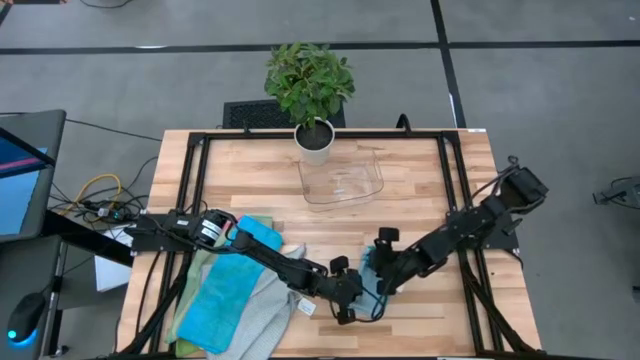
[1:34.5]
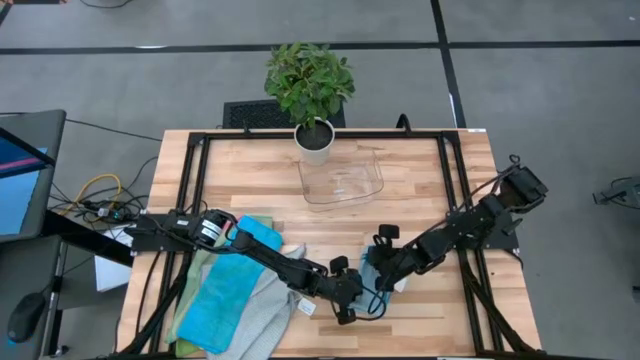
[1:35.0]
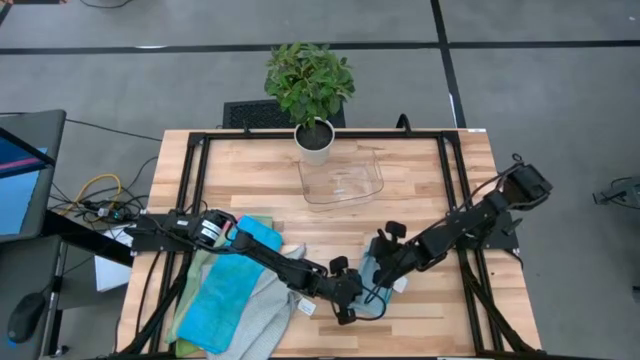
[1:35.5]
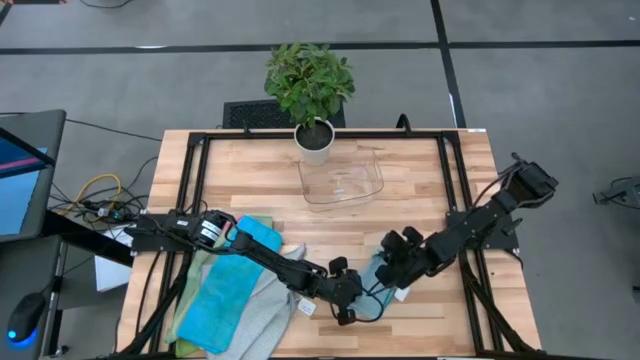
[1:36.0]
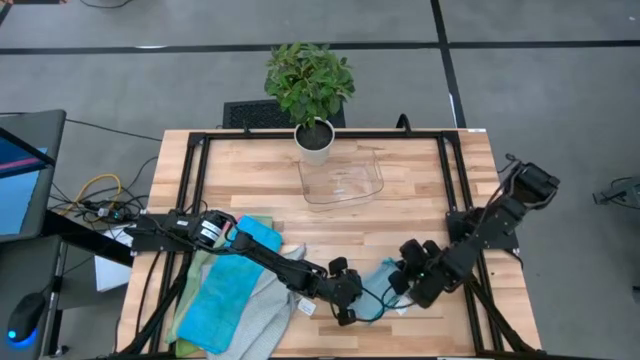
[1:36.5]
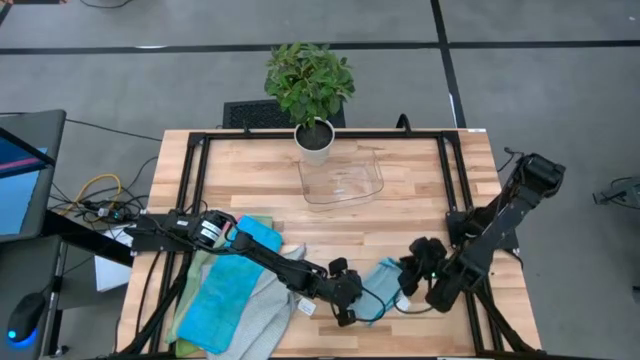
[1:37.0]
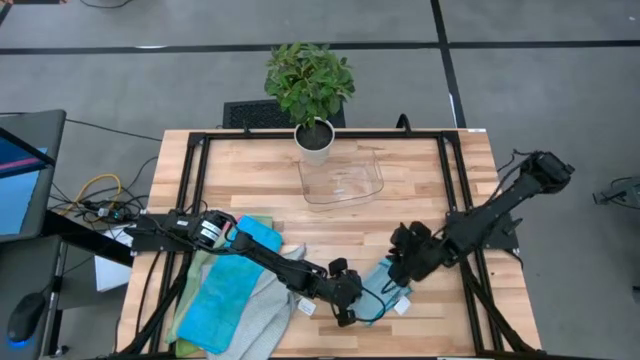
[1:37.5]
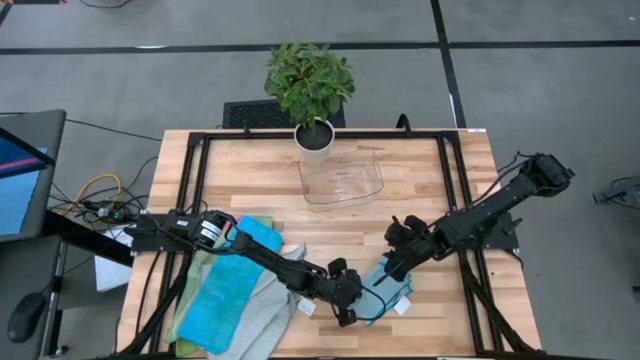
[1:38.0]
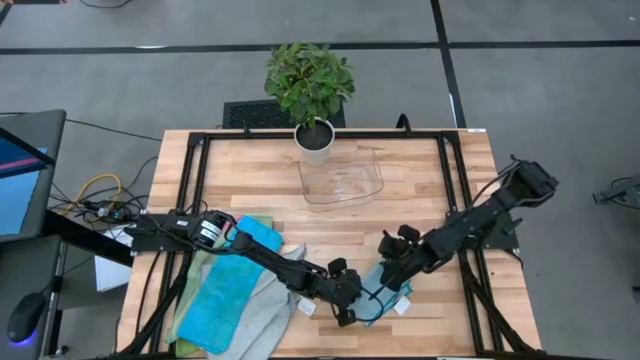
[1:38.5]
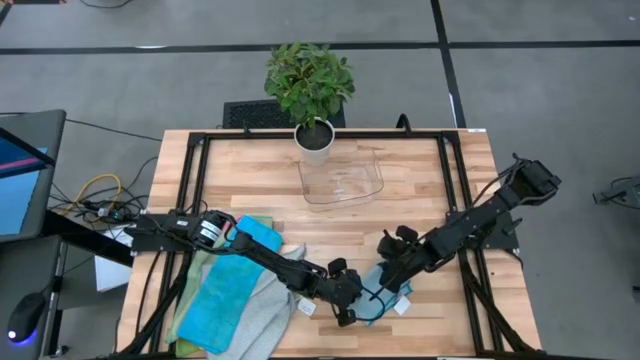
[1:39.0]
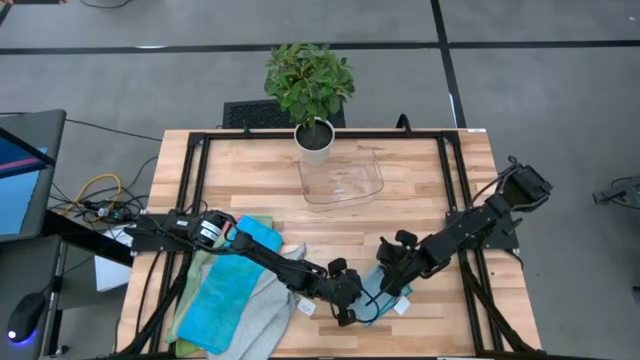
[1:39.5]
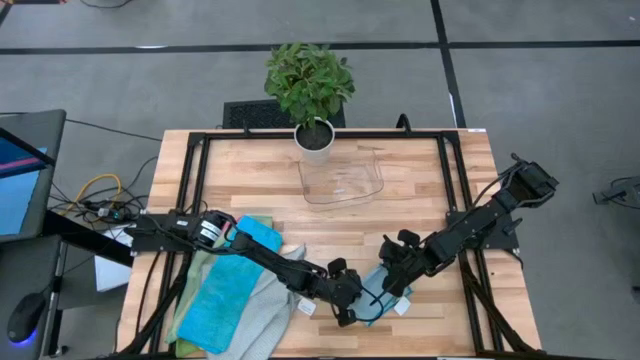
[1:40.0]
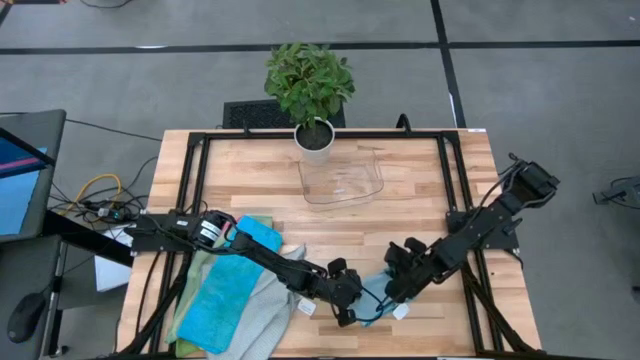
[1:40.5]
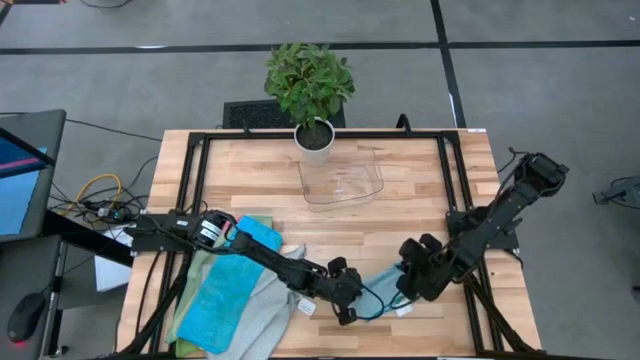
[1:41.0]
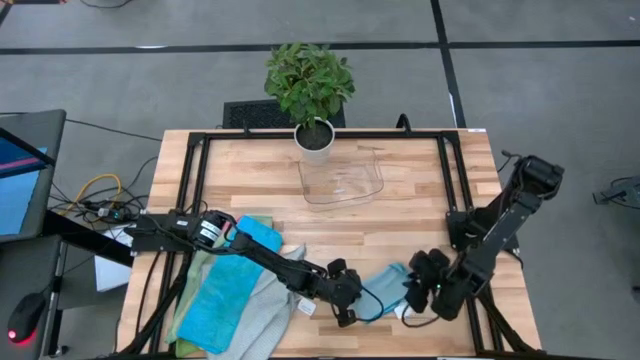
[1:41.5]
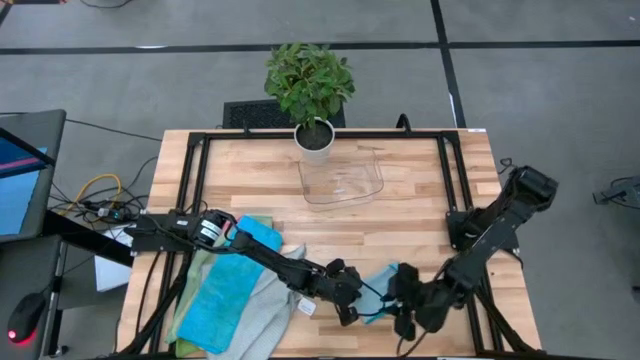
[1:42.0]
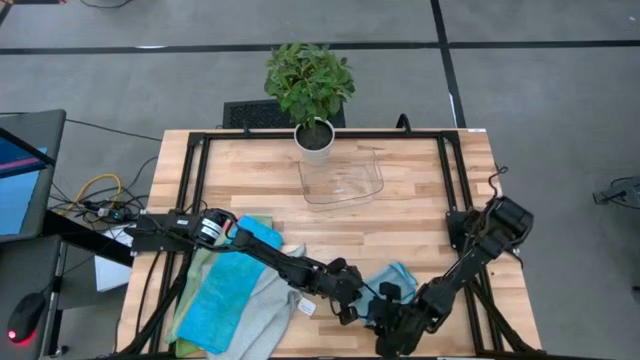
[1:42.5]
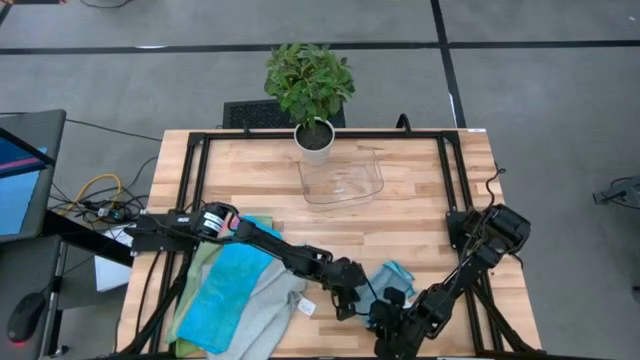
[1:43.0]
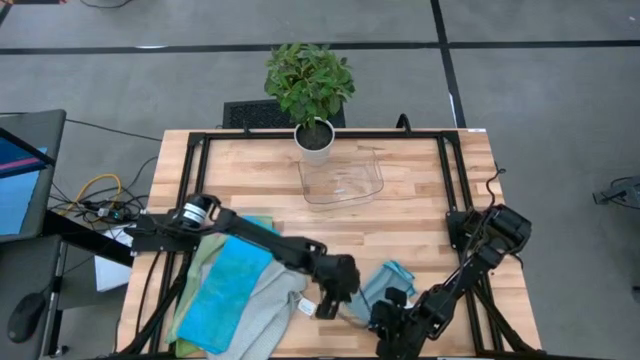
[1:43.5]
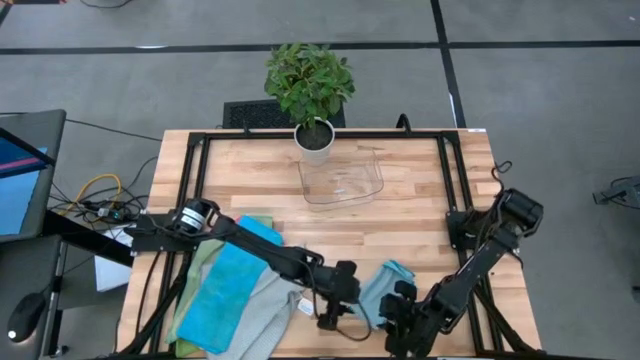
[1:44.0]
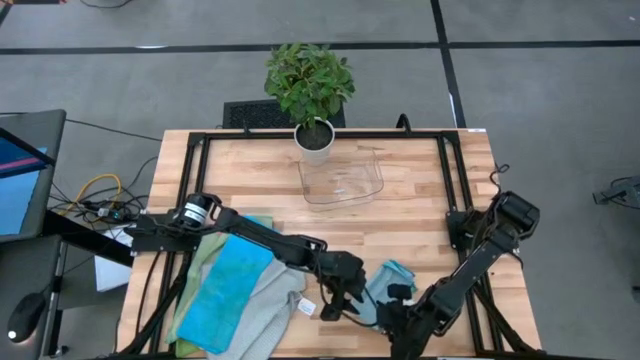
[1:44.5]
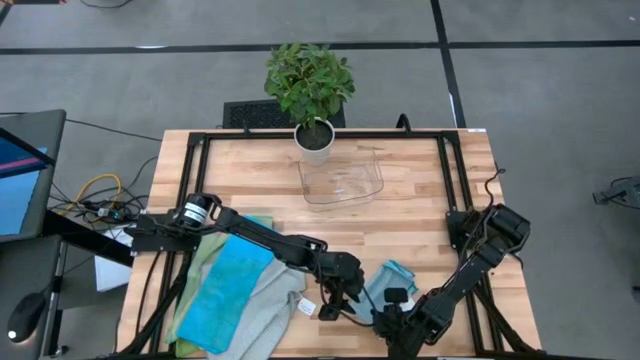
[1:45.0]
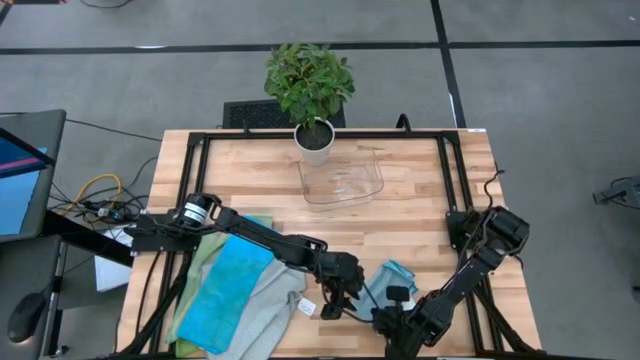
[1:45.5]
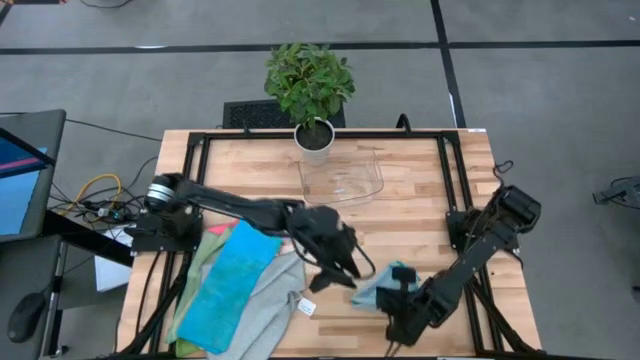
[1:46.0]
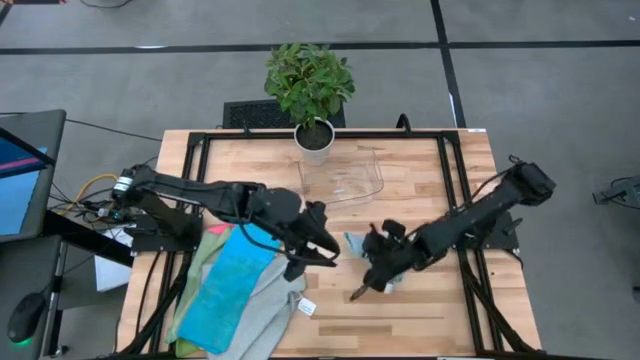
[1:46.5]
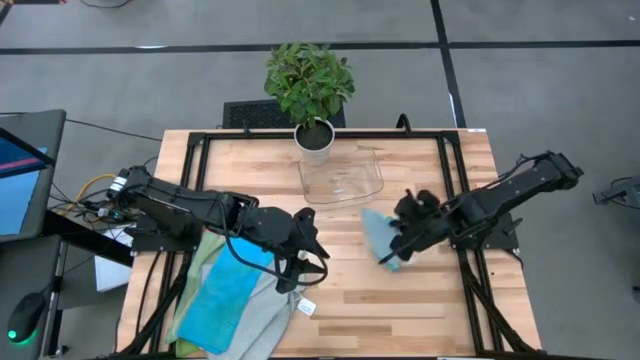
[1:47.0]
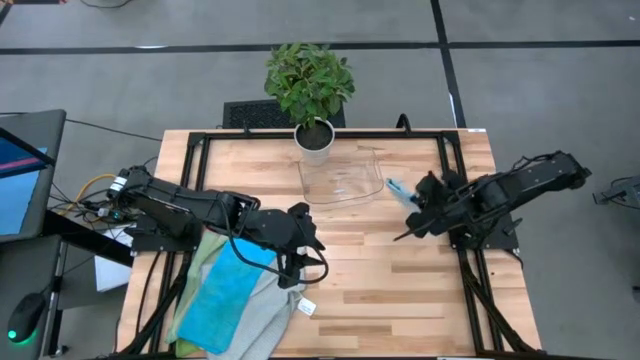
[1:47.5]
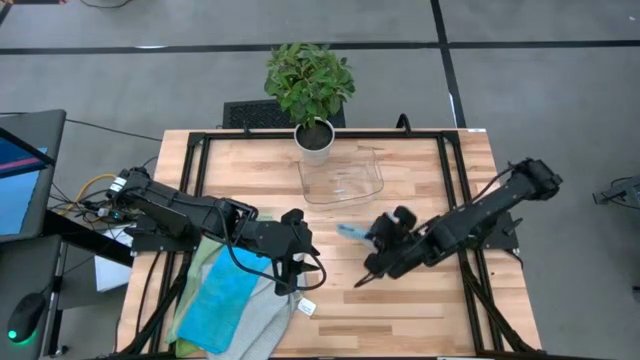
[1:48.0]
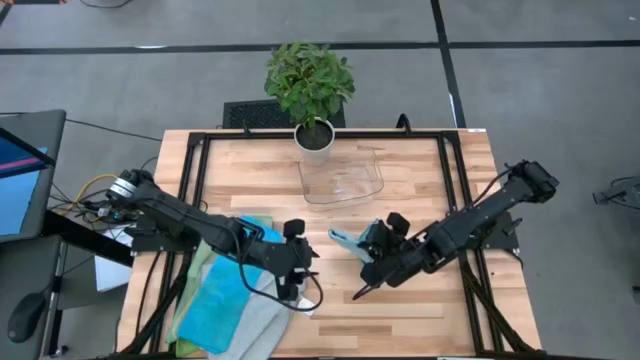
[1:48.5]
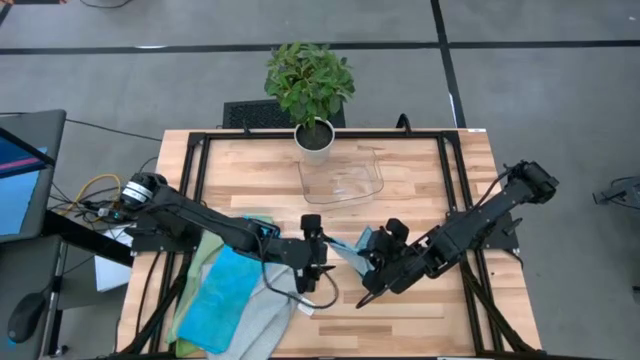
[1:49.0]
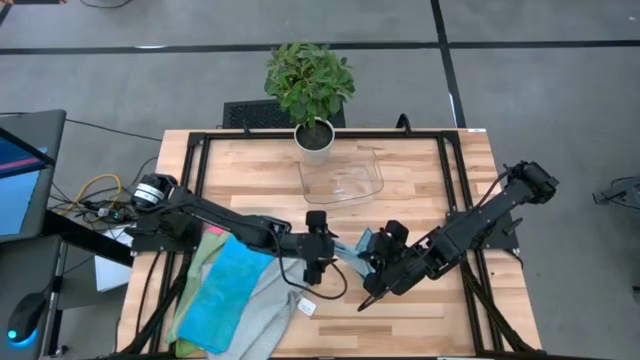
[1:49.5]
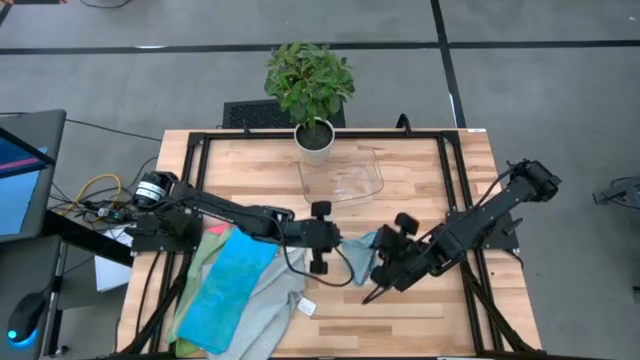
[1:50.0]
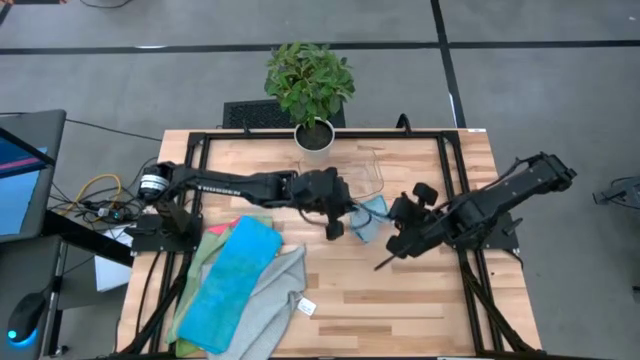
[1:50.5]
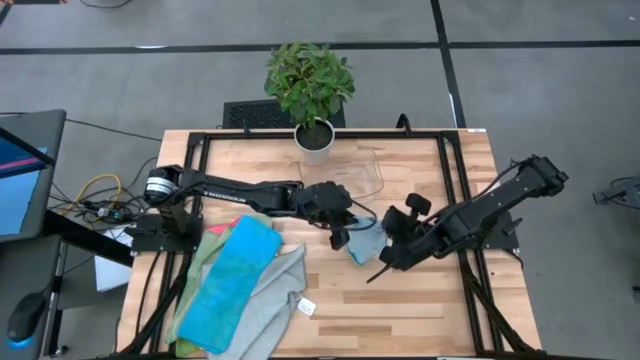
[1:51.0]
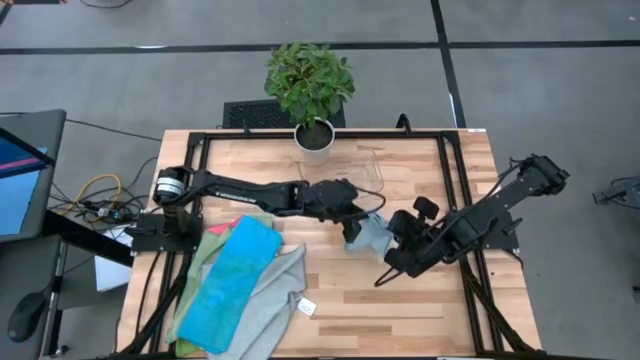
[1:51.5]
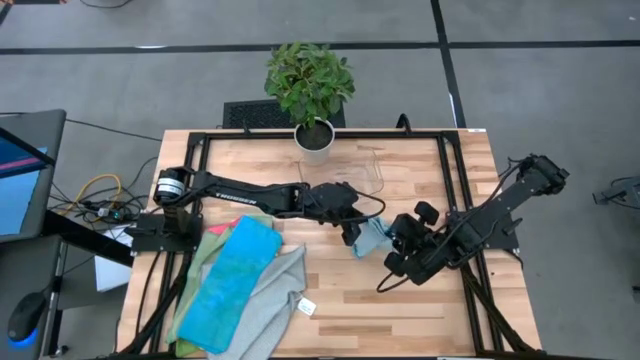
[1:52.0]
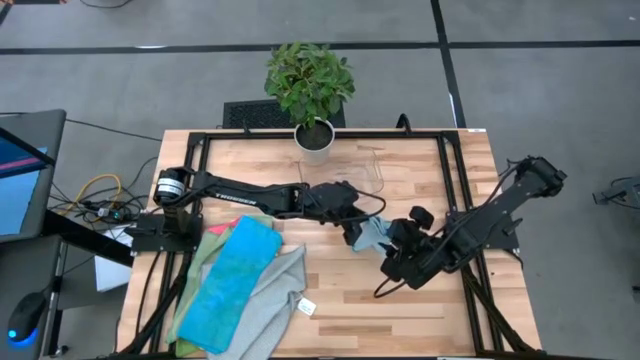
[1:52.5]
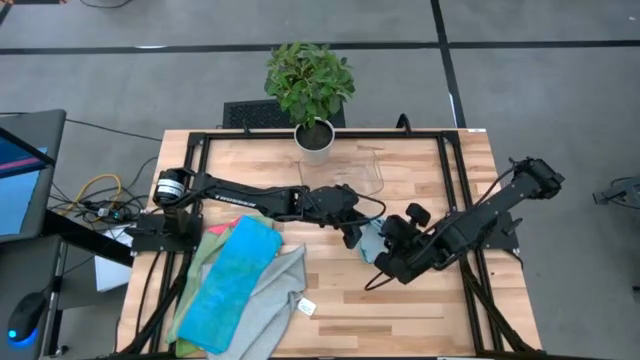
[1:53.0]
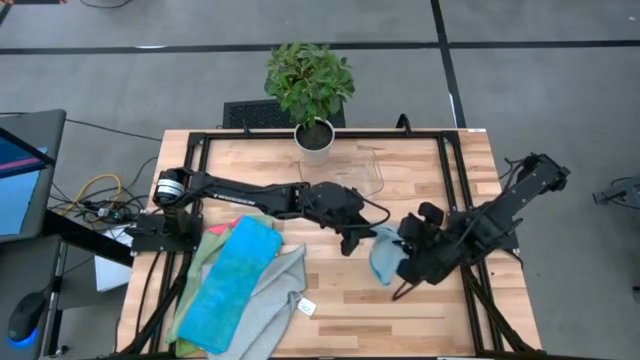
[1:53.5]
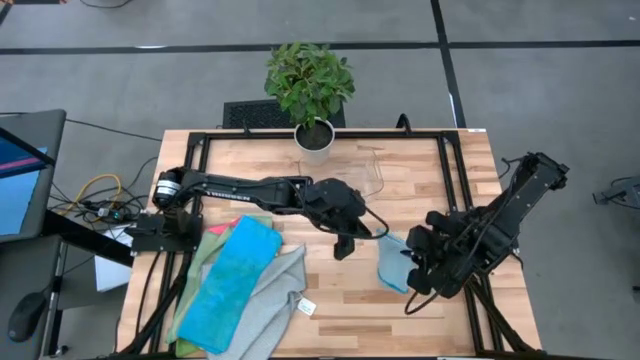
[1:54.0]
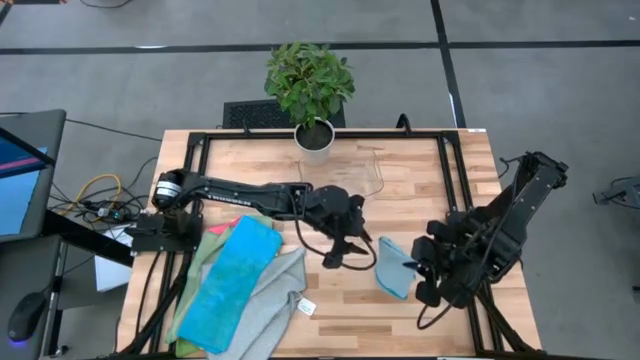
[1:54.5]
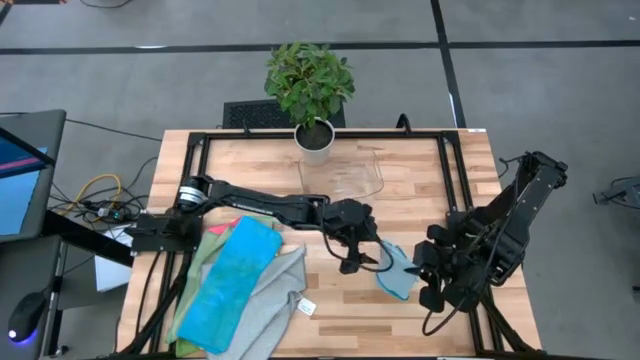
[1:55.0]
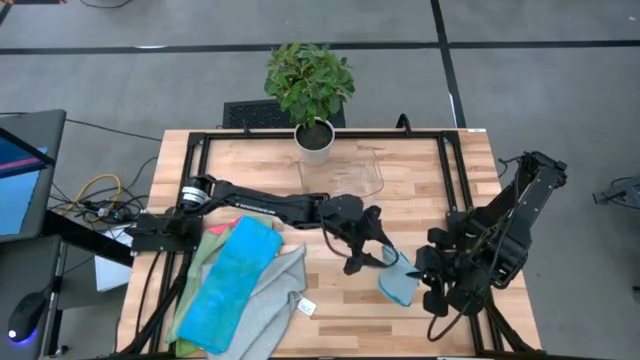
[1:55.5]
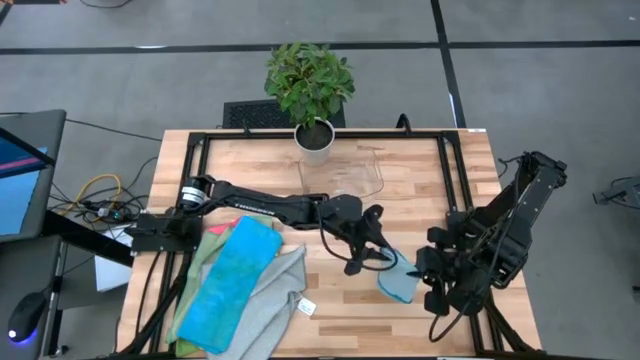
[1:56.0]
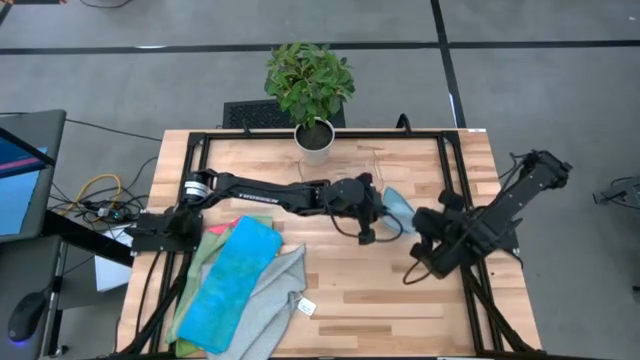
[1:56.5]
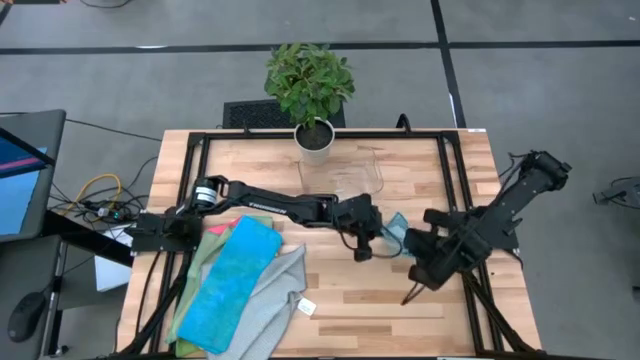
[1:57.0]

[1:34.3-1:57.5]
Task: Fold microfiber towels
Fold the light blue microfiber cloth
